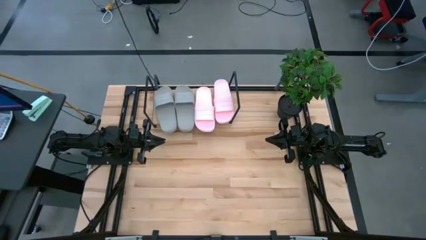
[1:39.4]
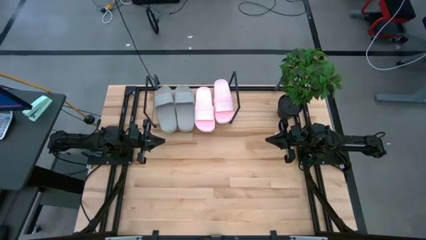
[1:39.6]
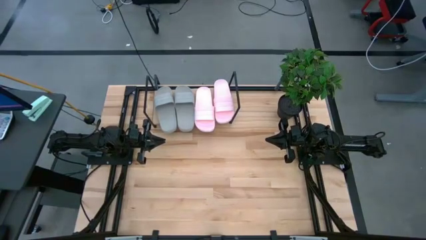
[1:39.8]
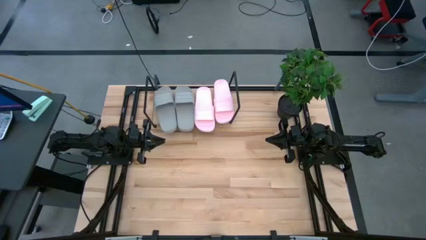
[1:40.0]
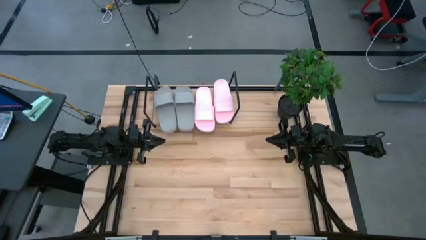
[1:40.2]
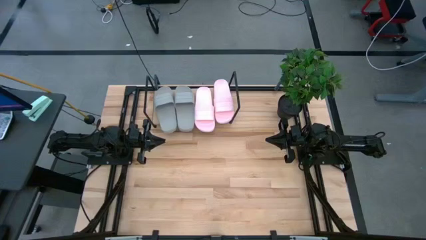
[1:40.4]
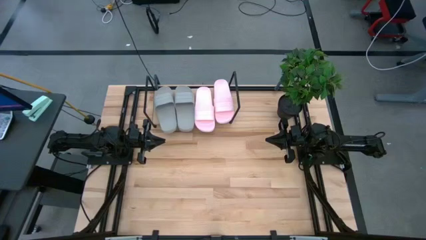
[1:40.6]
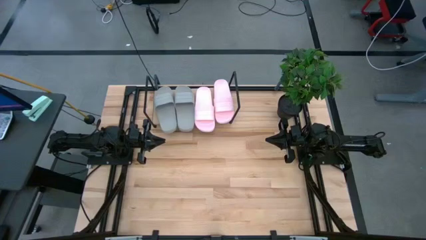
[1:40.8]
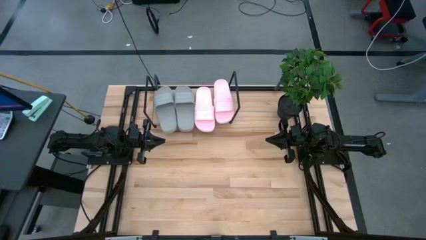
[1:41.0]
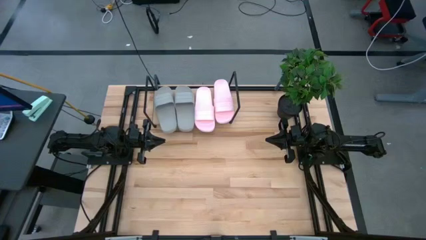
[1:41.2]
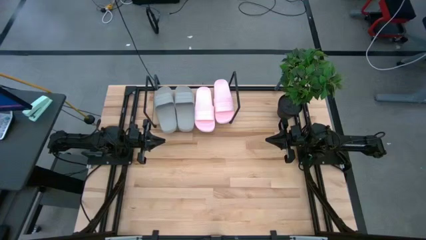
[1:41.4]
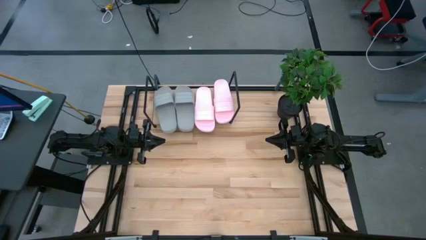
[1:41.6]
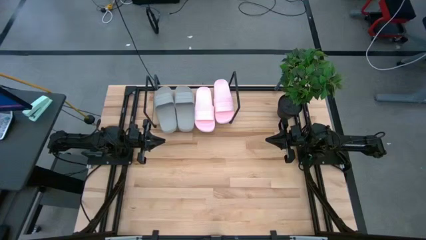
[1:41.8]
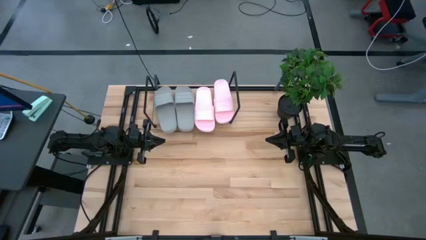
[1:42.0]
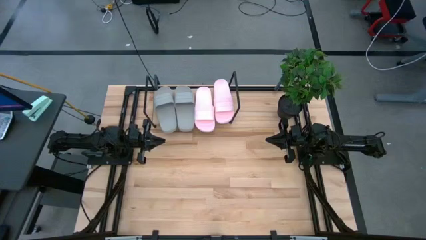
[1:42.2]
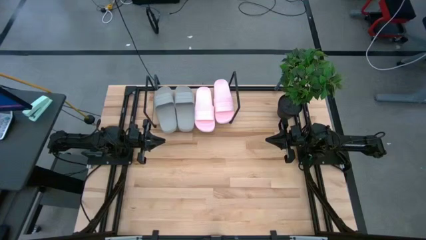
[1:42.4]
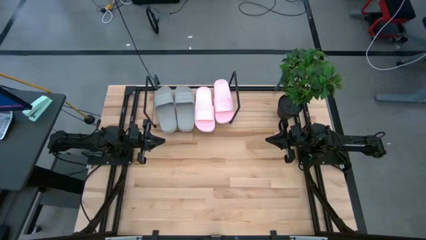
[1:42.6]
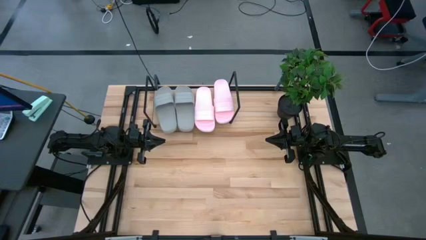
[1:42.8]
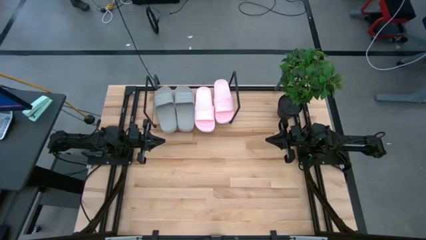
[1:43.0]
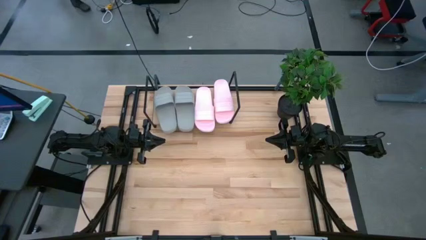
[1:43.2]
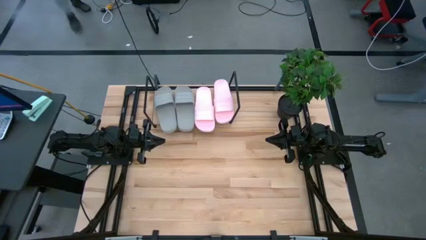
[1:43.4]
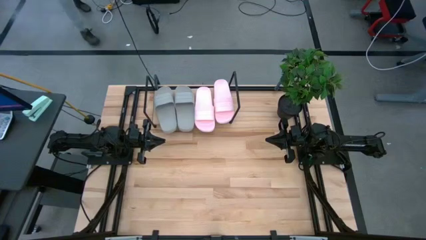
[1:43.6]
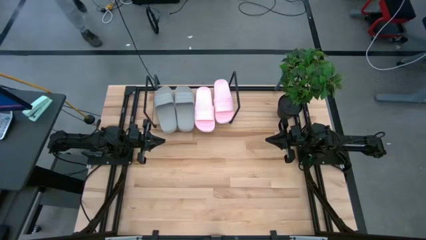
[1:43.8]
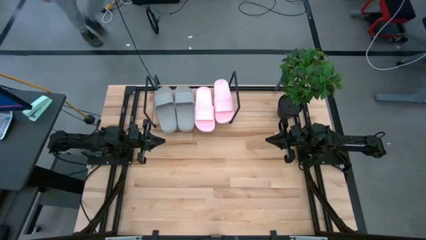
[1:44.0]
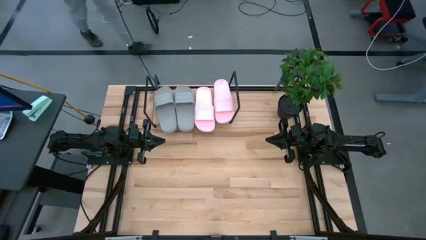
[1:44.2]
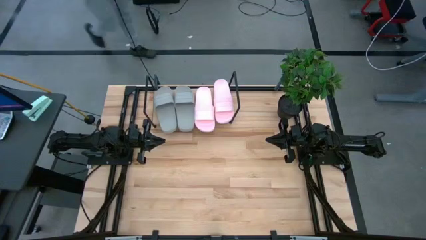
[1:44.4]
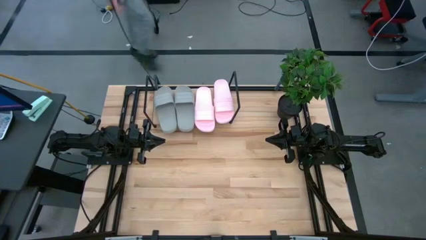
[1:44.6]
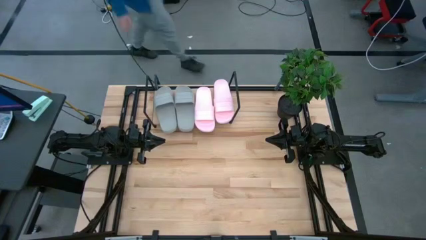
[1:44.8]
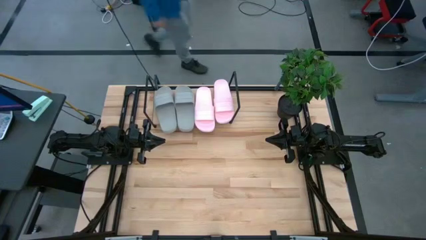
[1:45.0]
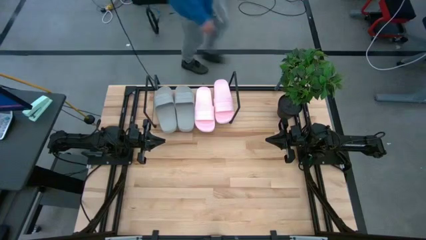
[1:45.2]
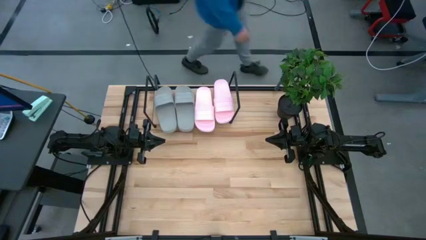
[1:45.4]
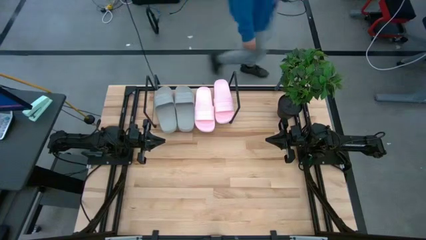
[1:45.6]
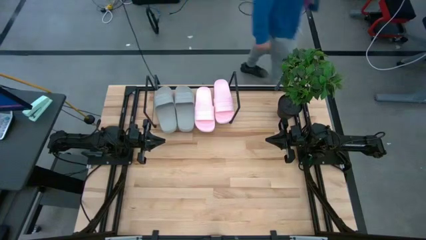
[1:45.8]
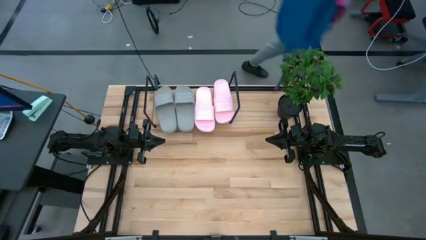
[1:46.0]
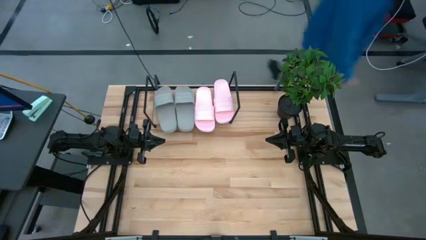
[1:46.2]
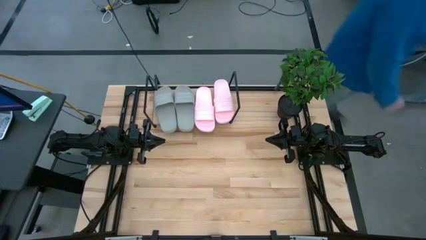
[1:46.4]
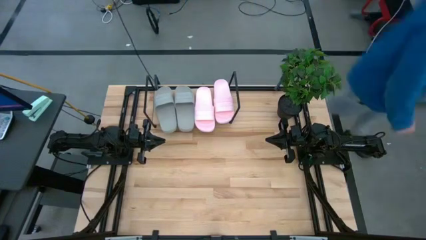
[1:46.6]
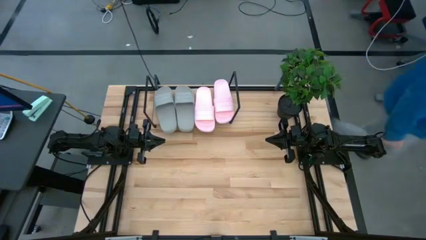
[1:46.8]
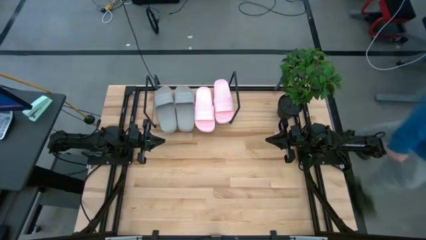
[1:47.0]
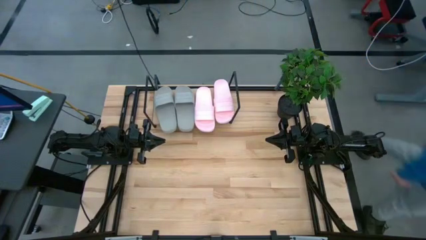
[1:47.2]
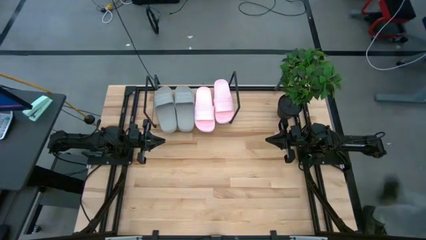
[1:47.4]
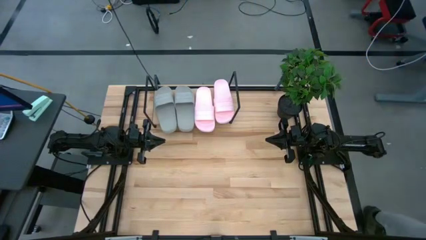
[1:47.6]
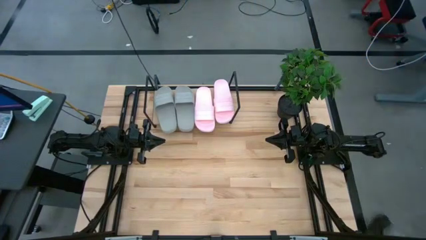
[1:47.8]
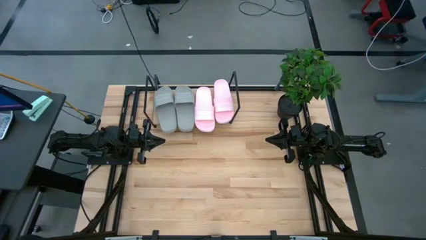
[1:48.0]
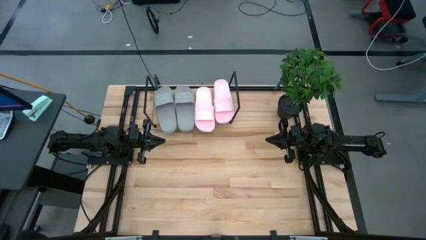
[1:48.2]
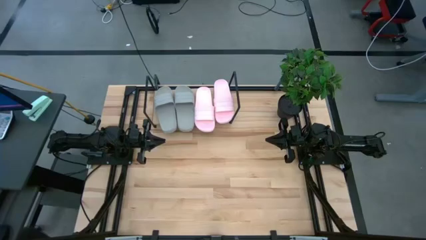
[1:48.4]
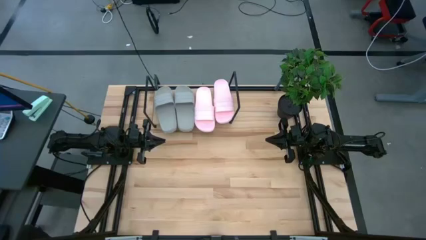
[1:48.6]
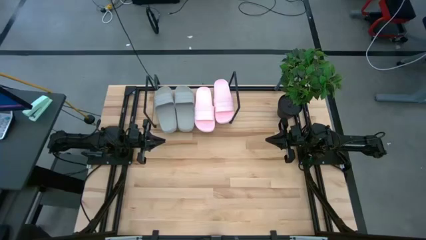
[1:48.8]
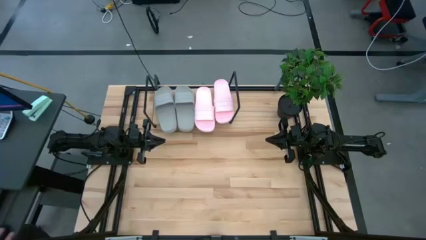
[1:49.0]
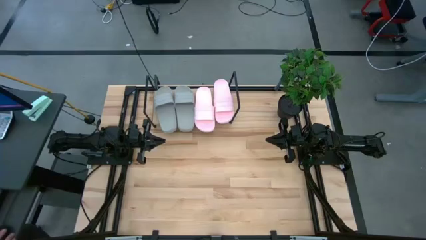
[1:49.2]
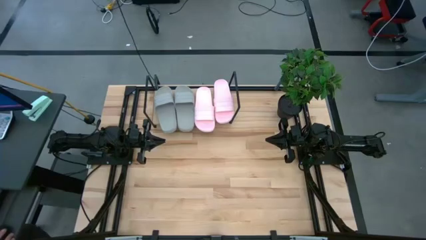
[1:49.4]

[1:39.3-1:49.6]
Task: Pick and place slides into the shelf
Return to Home Position

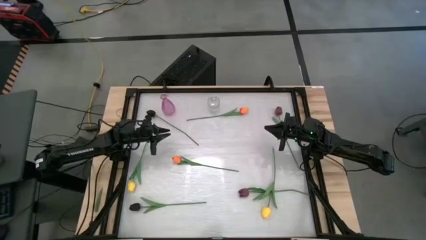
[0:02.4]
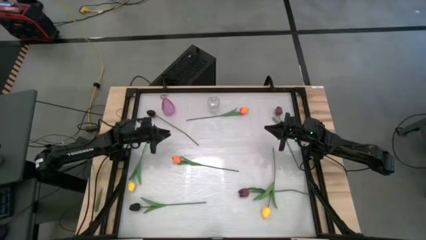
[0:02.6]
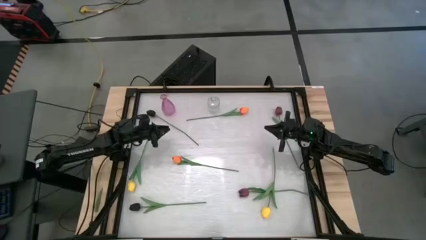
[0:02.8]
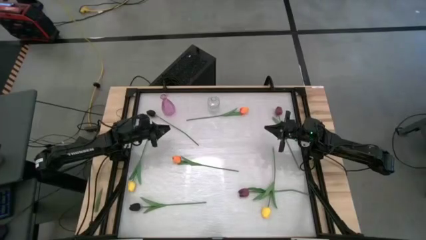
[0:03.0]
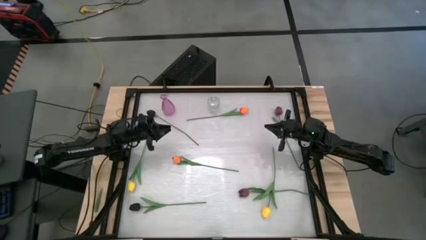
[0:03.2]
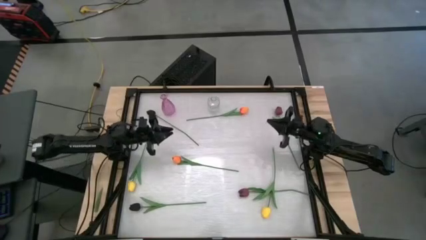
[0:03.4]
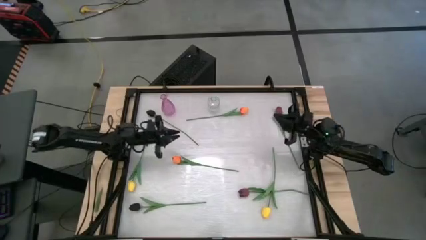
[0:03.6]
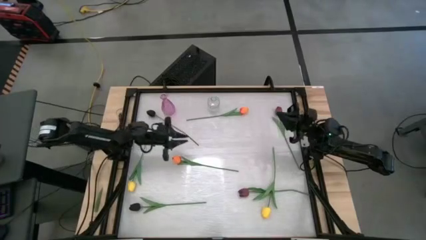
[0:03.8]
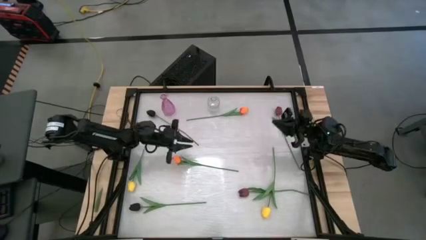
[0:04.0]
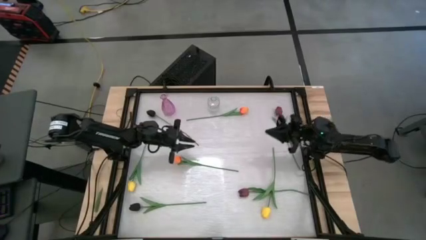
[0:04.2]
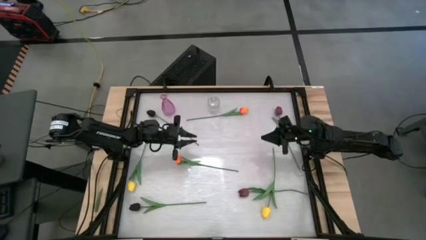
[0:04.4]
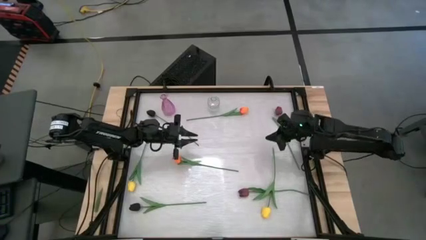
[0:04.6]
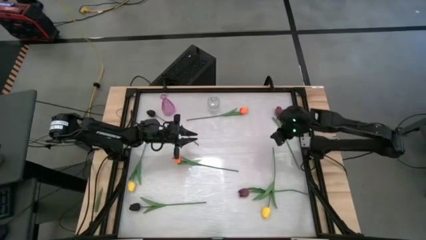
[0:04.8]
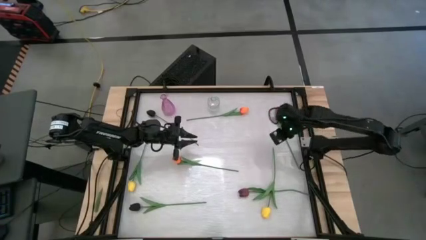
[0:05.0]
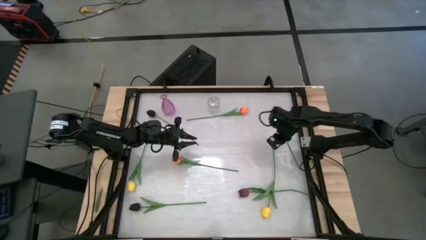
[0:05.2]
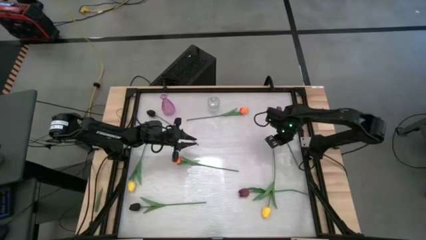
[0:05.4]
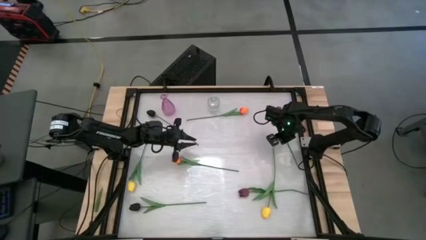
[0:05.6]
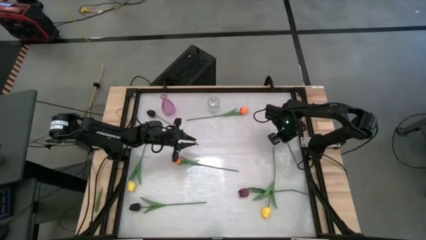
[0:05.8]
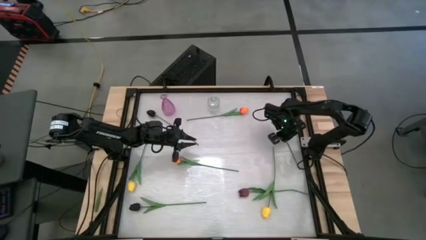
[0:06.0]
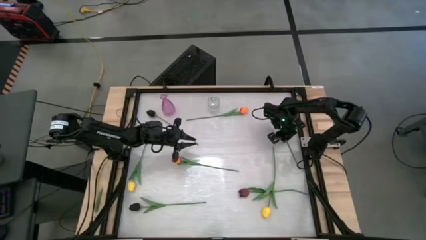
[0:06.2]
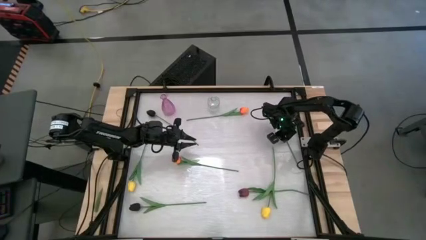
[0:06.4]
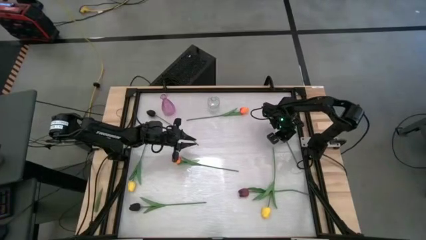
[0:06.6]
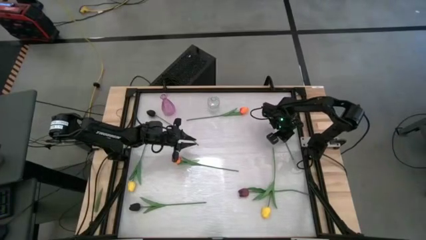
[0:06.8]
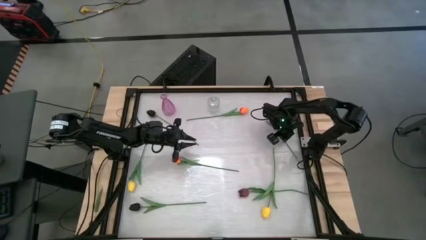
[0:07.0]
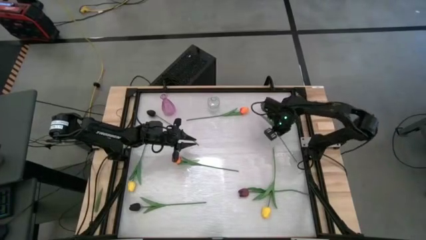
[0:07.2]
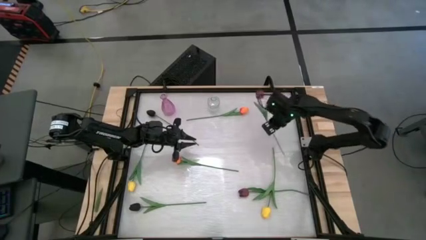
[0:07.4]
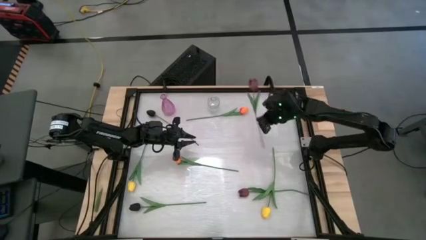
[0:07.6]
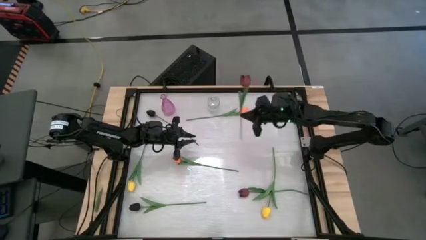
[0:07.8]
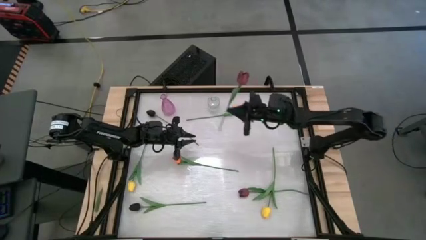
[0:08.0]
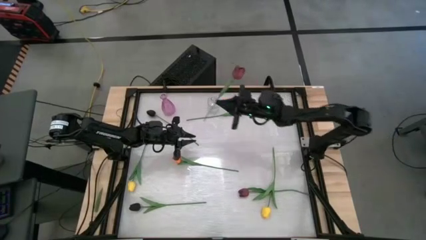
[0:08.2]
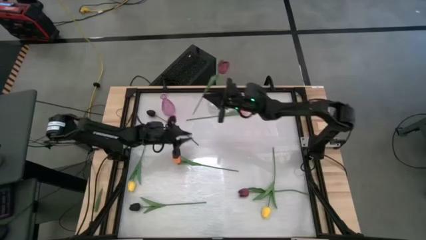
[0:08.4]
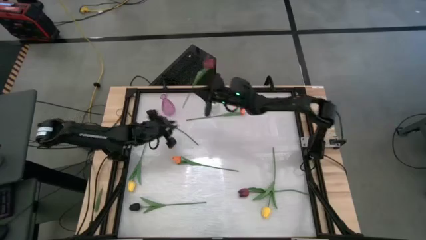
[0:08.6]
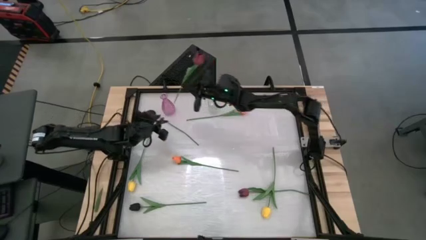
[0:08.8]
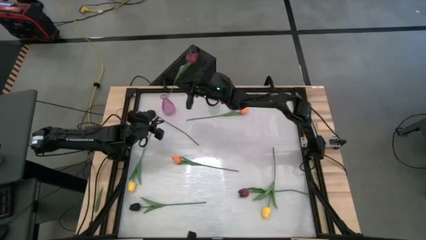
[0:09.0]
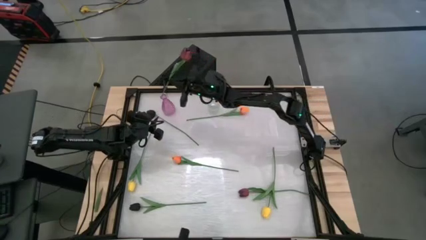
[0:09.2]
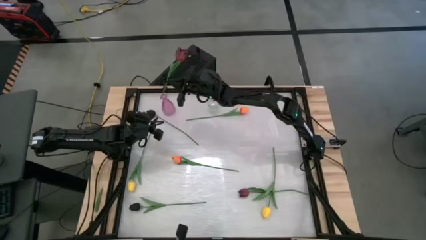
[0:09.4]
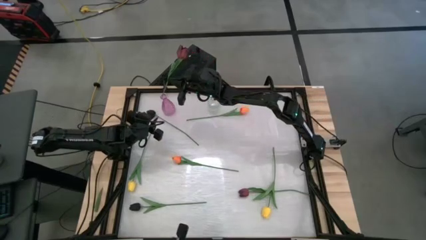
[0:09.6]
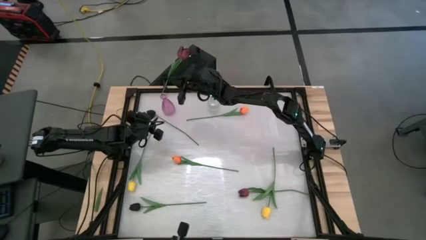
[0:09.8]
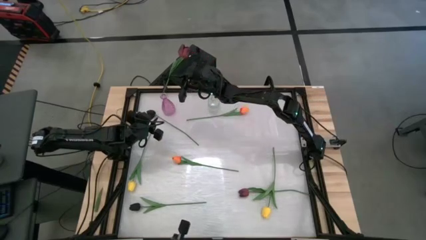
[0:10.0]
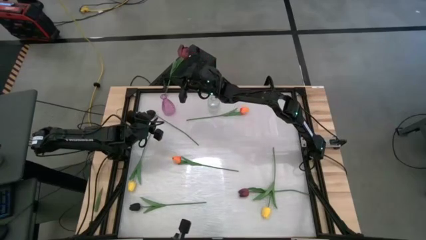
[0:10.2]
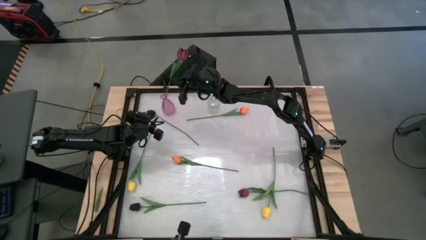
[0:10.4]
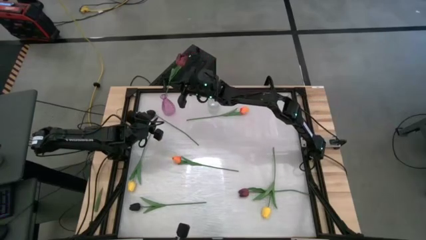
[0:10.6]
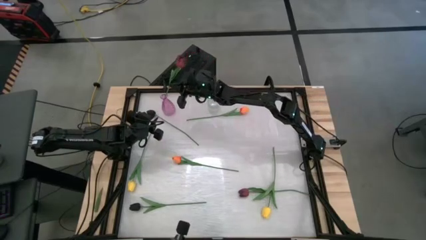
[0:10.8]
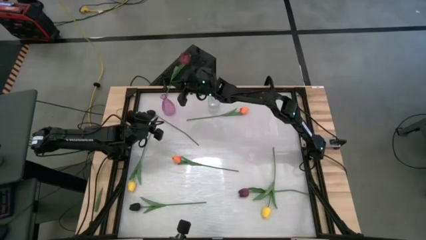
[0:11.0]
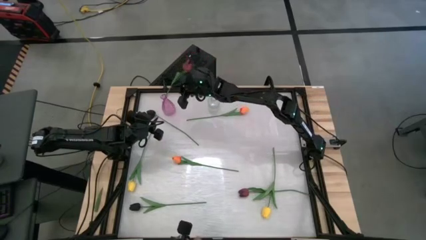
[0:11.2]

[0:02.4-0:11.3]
Task: Sort flowers into vase by color
Put the top red flower into the purple vase
